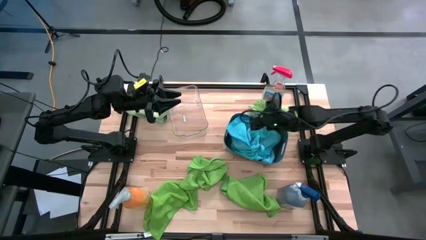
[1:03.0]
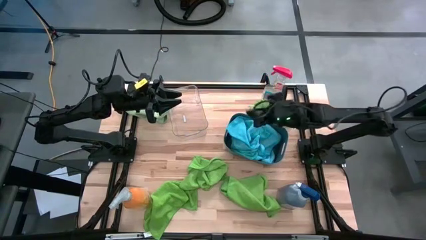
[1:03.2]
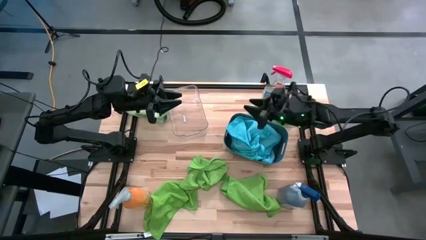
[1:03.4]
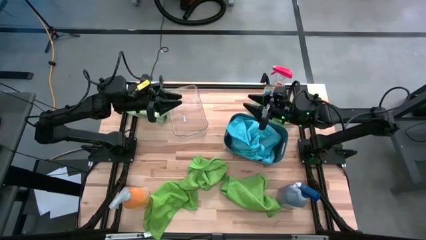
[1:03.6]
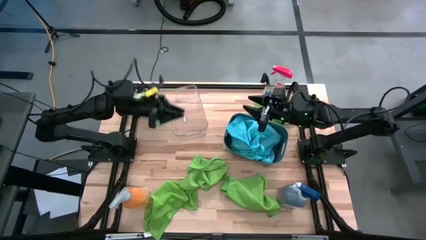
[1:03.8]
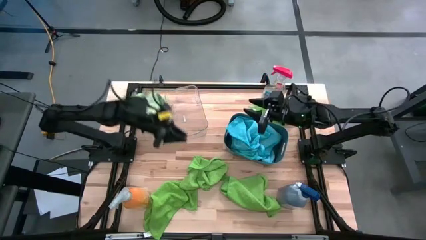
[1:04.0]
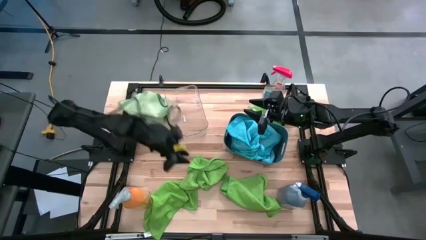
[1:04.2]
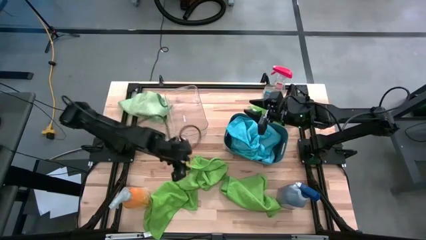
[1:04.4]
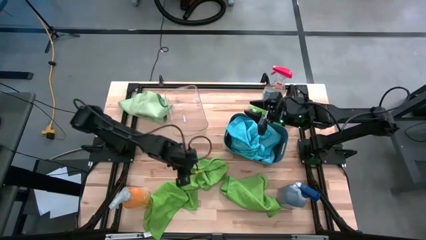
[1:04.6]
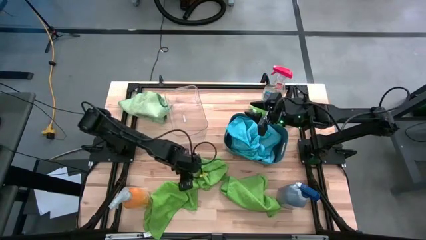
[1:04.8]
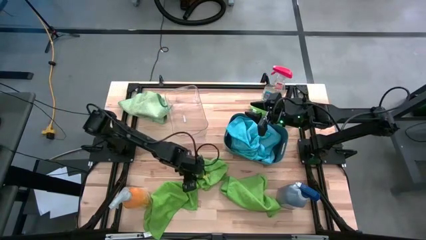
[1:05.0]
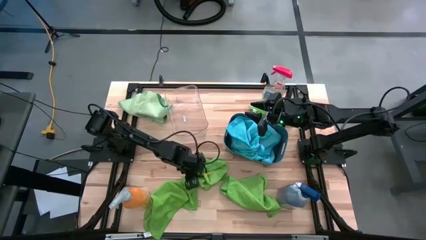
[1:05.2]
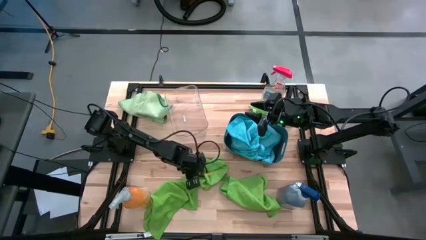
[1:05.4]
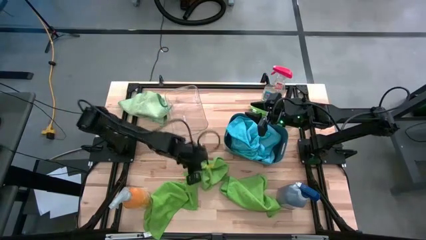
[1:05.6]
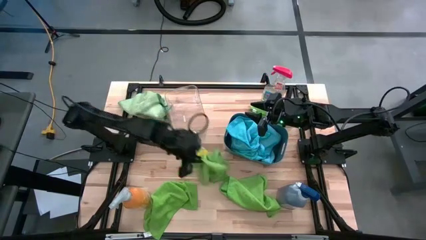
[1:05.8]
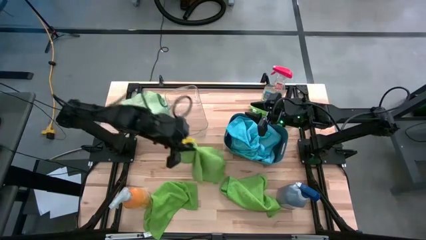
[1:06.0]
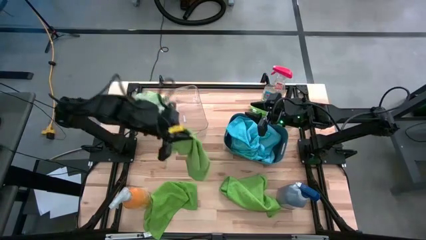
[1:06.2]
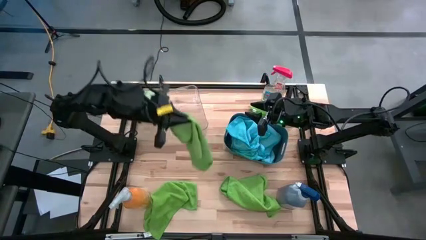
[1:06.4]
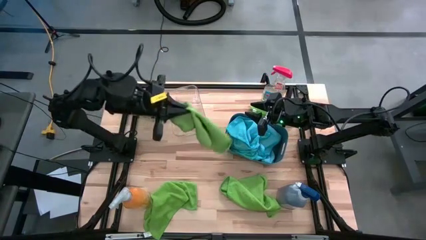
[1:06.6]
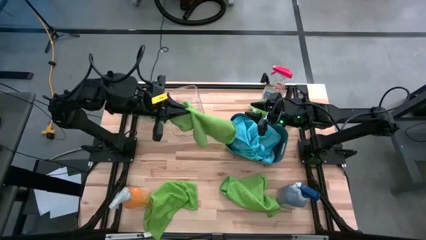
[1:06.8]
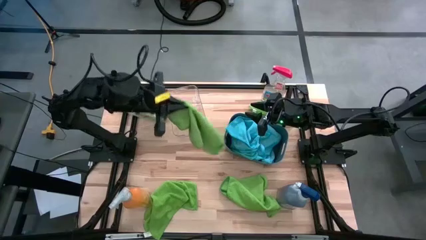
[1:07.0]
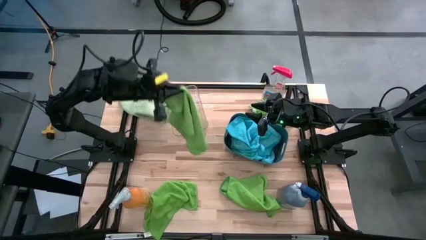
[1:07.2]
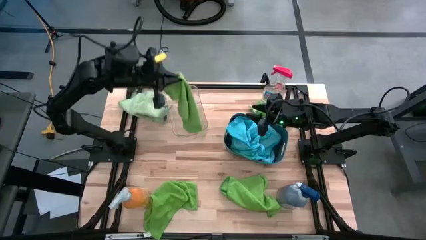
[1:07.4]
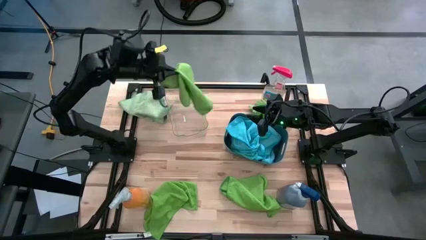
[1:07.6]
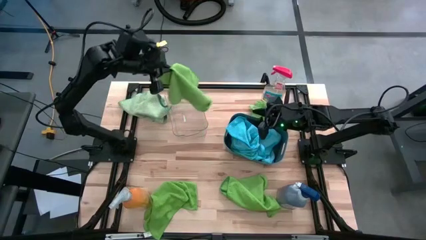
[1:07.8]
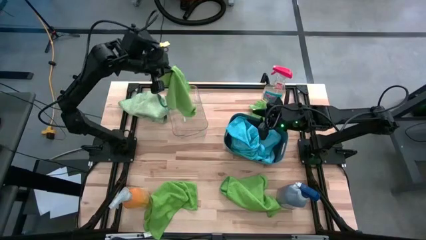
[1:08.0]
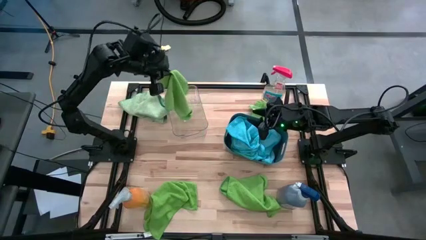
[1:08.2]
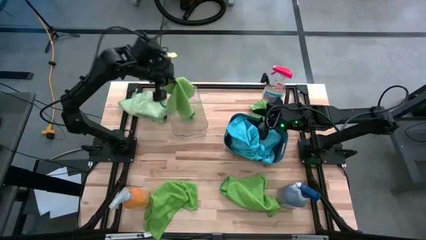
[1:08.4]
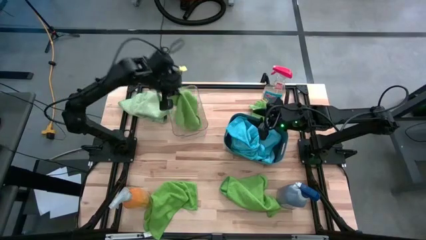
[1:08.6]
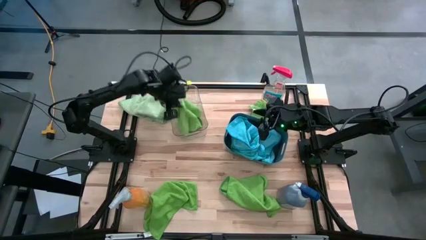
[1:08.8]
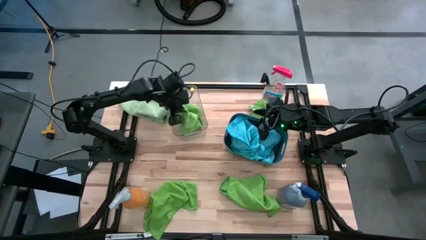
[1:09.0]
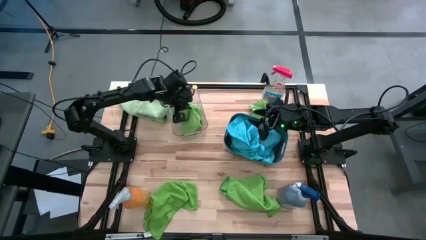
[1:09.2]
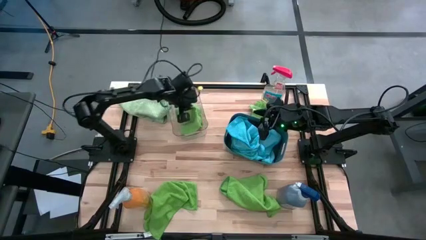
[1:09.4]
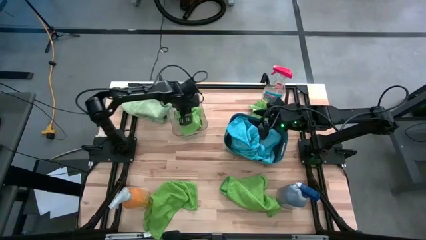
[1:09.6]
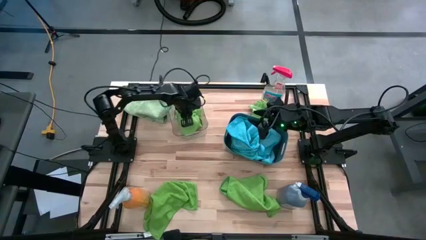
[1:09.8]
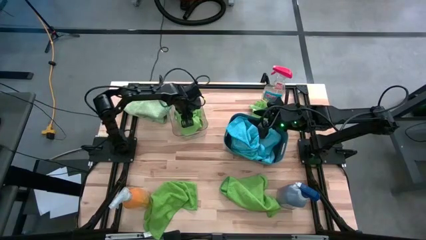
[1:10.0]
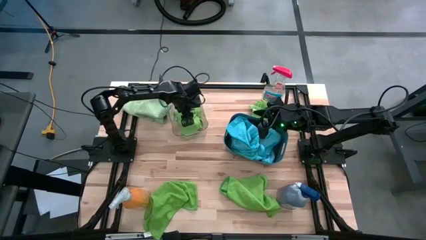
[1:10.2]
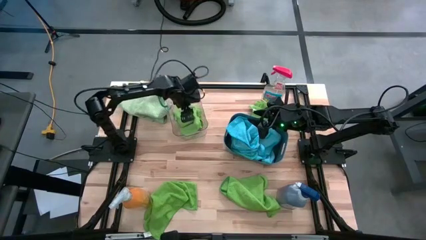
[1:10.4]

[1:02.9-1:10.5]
Task: Sort microfiber towel by color & place in baskets
Put the green towel into the transparent bin

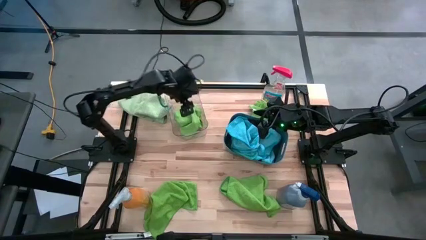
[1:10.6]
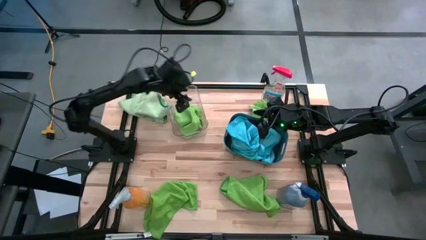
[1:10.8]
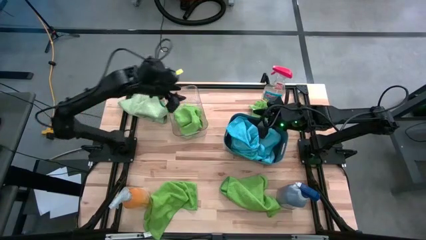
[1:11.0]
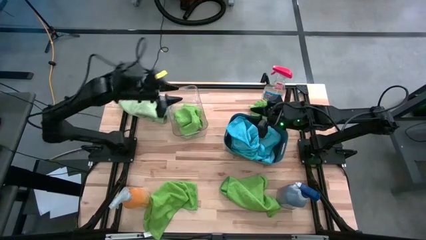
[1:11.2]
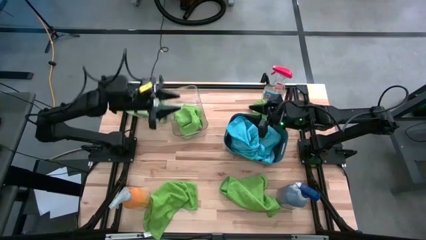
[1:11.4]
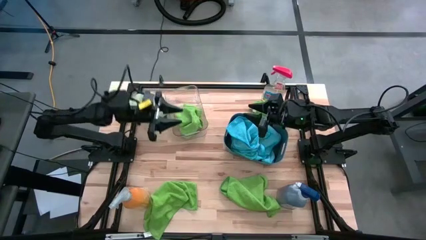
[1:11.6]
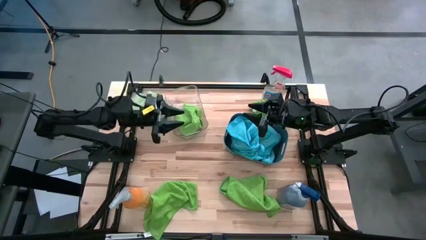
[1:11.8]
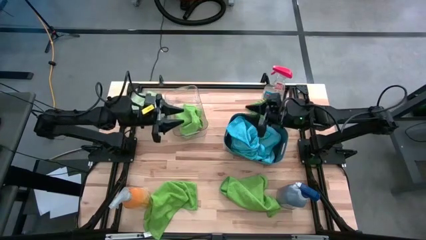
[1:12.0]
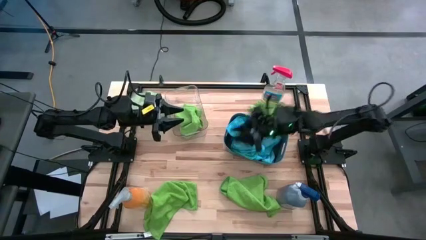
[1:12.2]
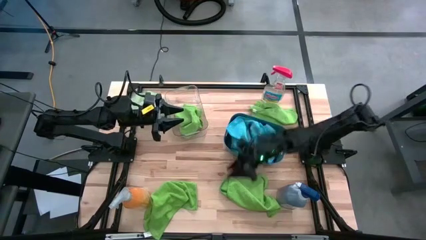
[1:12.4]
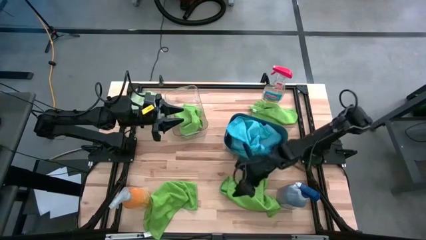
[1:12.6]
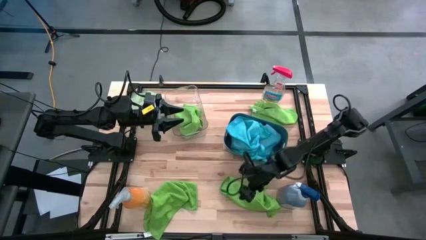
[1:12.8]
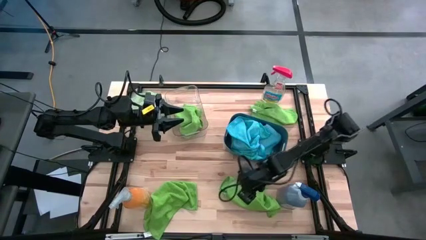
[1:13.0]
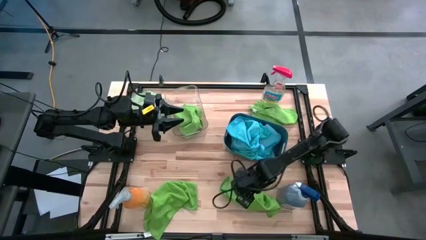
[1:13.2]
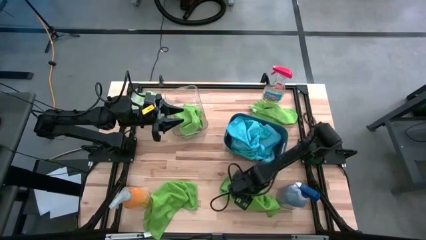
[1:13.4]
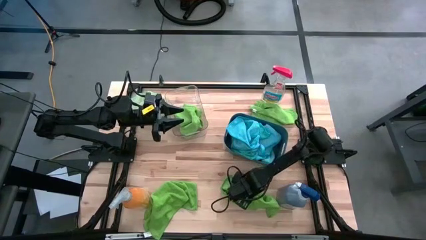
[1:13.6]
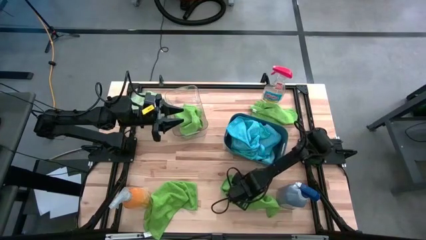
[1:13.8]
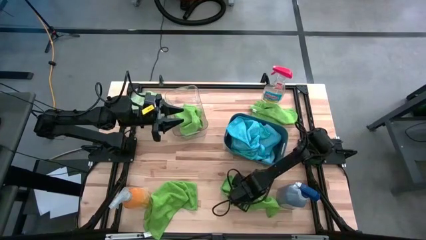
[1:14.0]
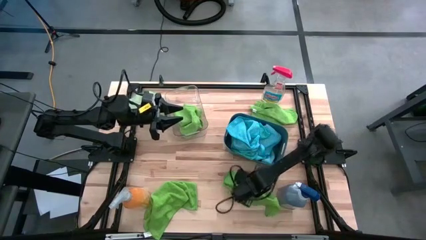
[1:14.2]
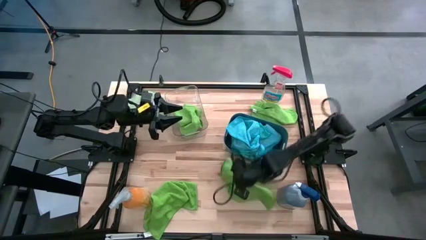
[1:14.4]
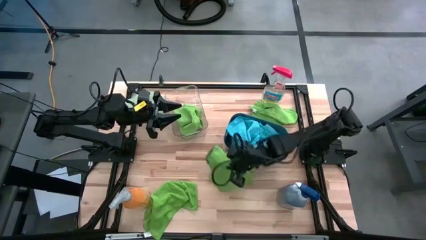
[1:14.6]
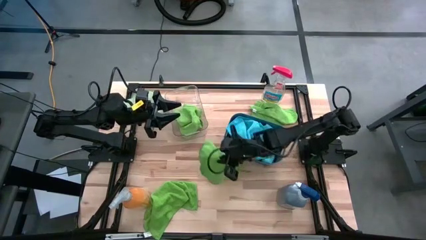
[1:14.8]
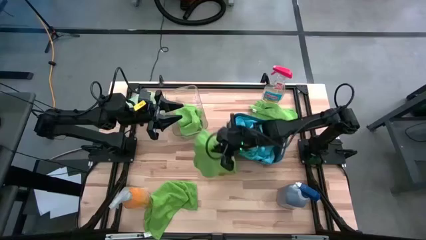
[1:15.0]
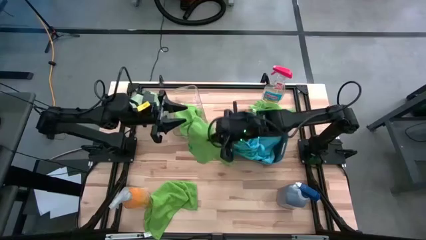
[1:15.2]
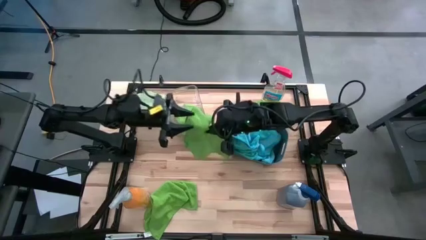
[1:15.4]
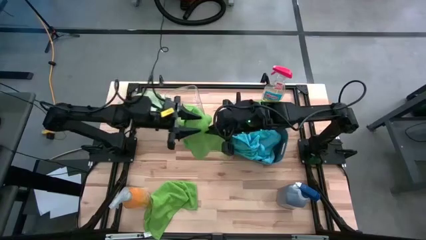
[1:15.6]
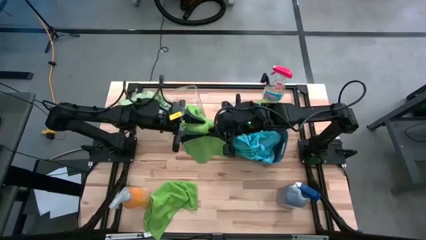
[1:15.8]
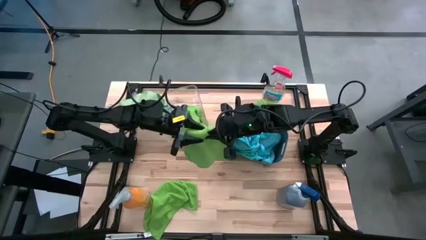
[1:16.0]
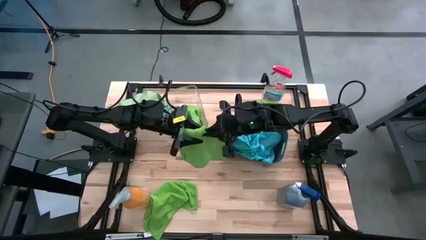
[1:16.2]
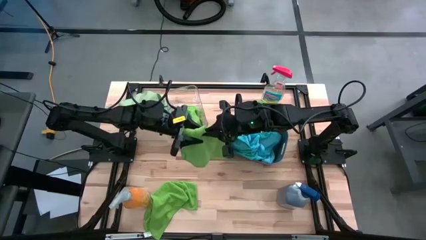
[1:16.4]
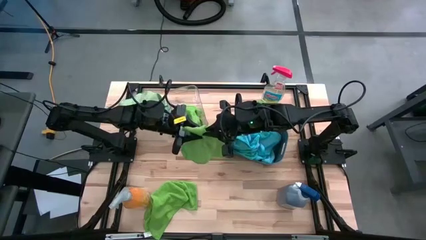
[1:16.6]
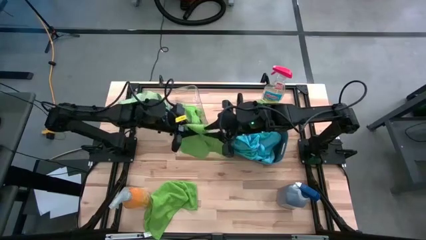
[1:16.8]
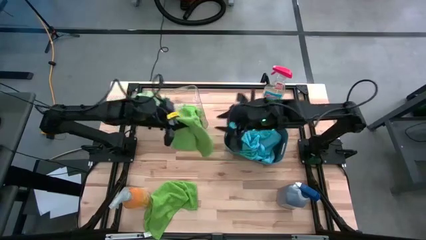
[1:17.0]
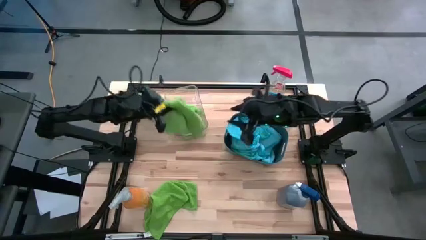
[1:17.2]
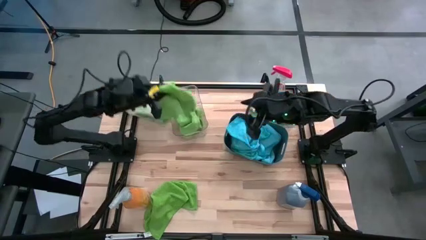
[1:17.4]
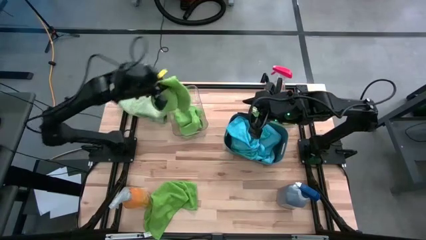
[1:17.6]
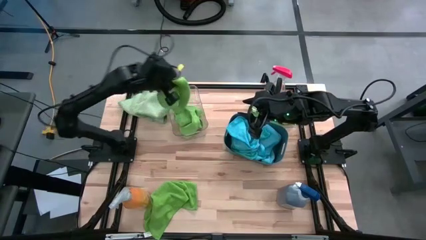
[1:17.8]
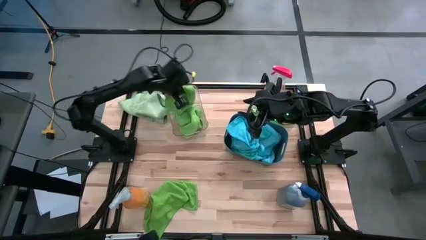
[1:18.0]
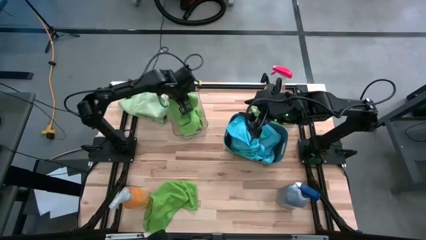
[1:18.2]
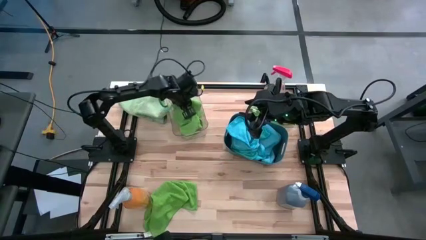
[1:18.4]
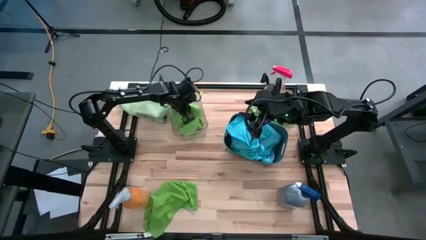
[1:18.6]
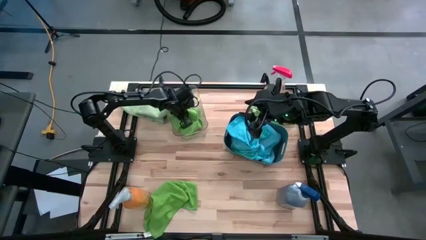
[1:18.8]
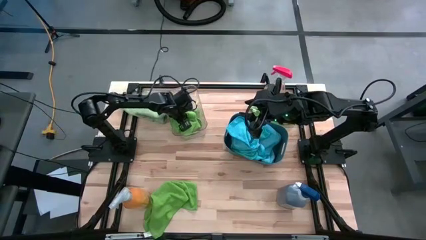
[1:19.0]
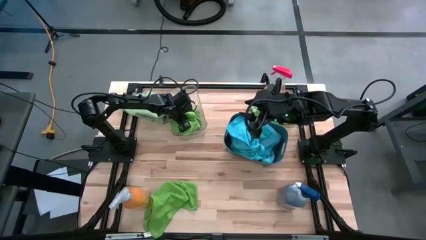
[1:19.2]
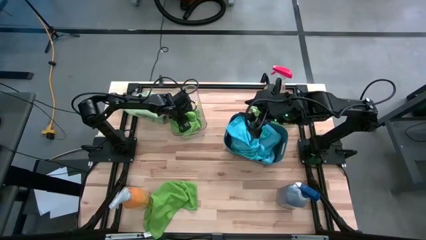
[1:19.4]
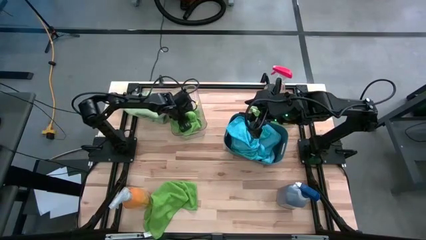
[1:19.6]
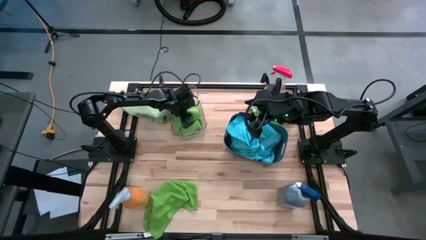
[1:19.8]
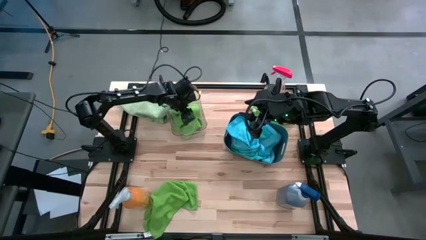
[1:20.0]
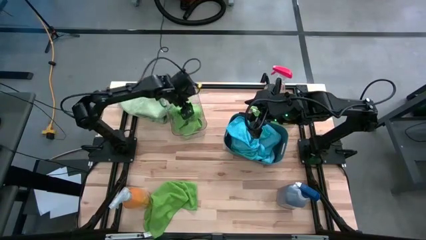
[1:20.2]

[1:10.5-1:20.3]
Put the green towel into the transparent bin
